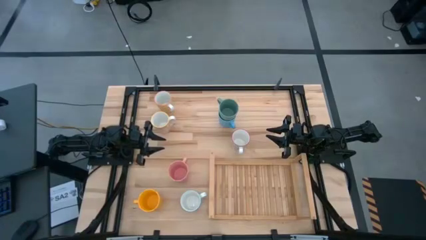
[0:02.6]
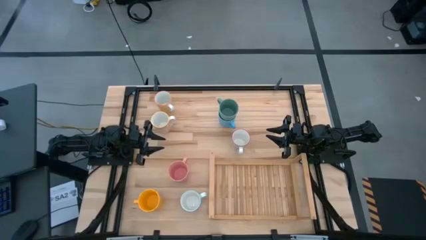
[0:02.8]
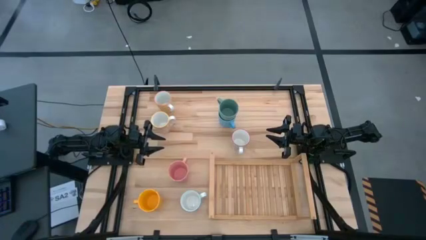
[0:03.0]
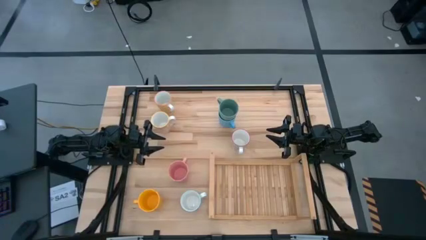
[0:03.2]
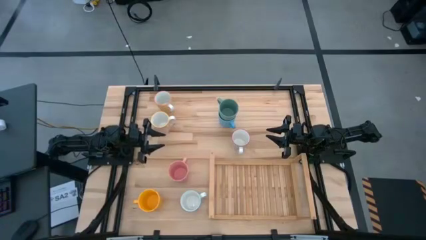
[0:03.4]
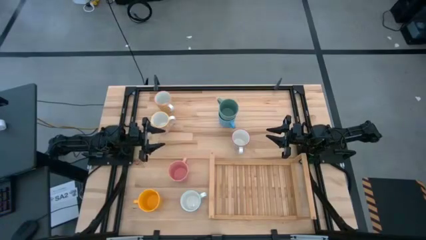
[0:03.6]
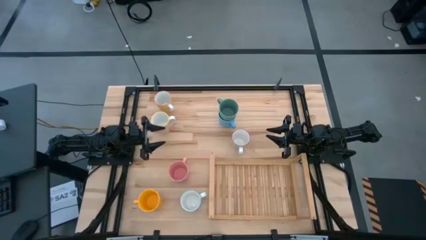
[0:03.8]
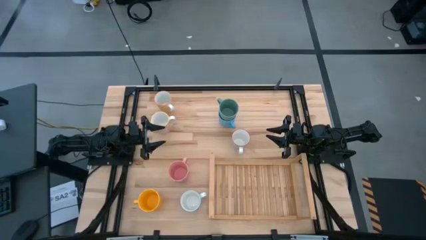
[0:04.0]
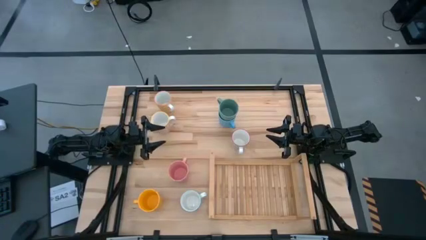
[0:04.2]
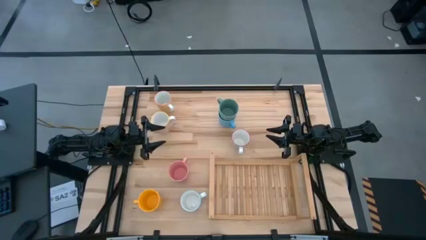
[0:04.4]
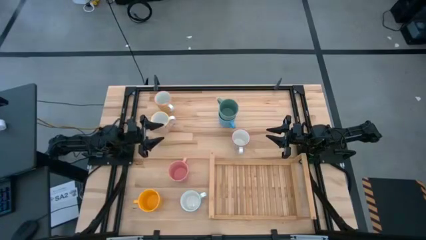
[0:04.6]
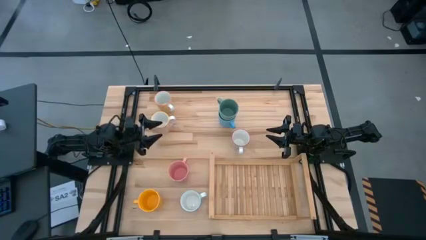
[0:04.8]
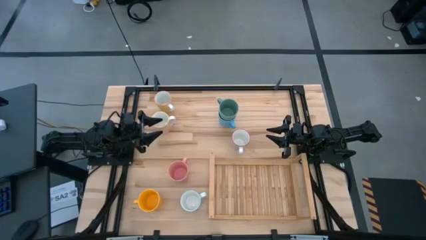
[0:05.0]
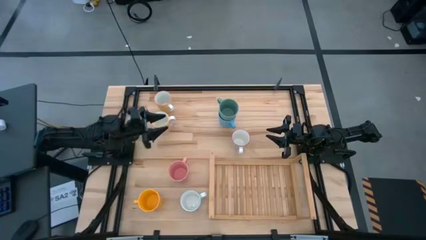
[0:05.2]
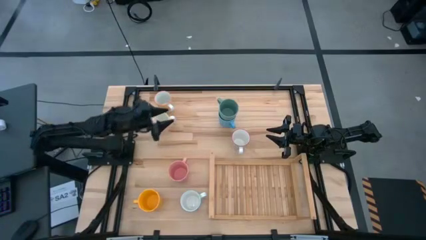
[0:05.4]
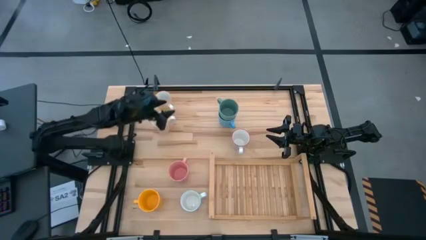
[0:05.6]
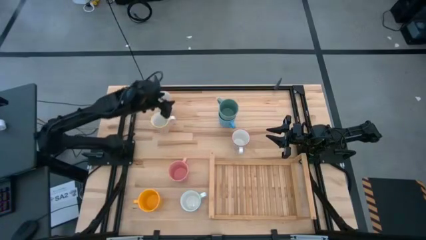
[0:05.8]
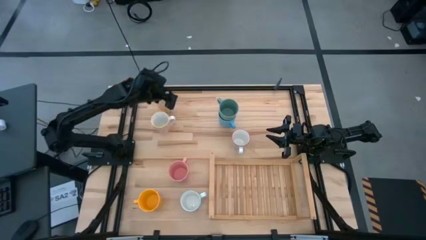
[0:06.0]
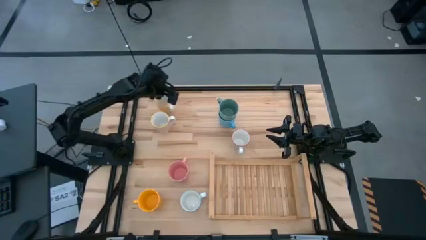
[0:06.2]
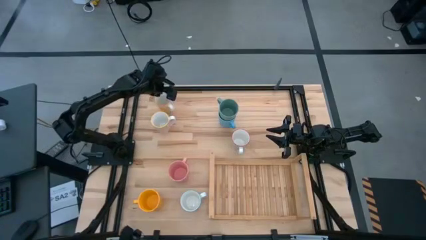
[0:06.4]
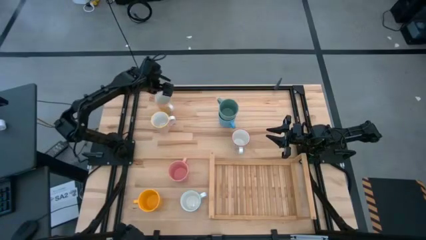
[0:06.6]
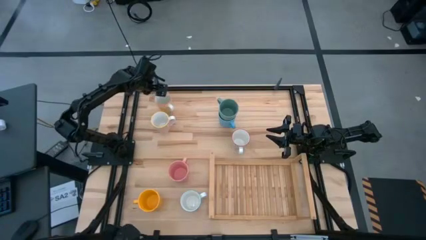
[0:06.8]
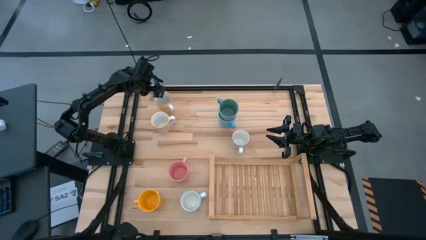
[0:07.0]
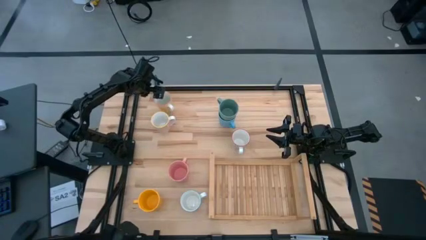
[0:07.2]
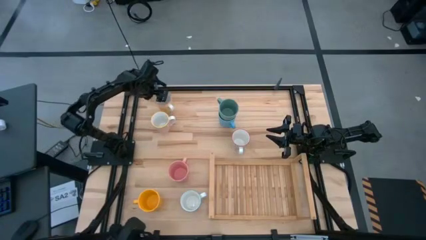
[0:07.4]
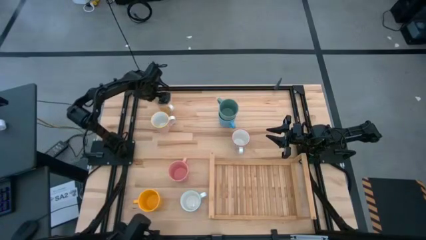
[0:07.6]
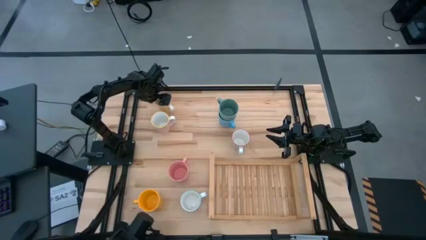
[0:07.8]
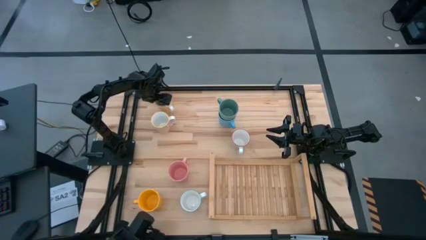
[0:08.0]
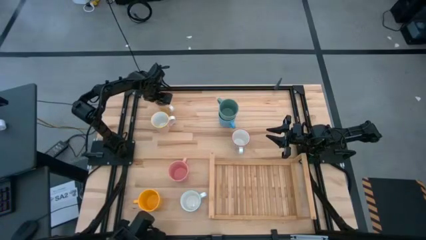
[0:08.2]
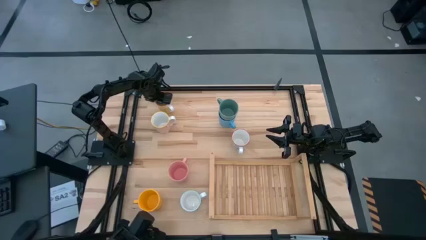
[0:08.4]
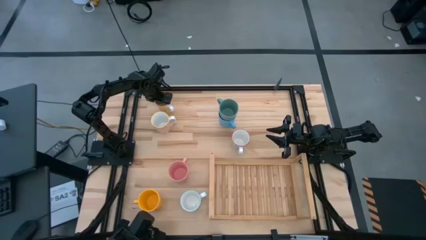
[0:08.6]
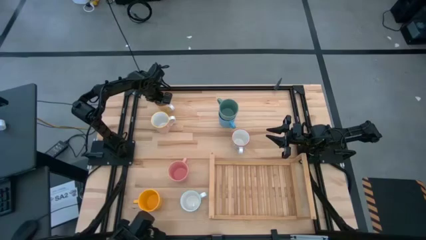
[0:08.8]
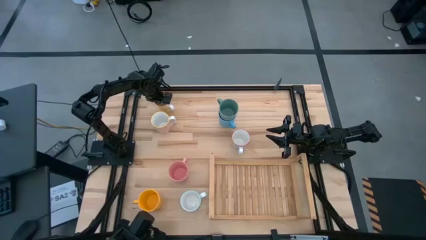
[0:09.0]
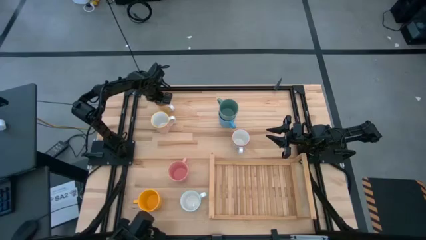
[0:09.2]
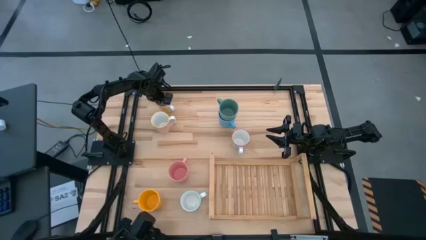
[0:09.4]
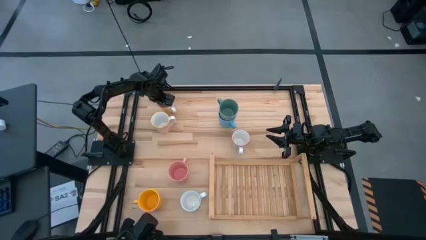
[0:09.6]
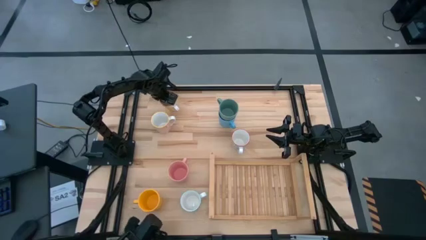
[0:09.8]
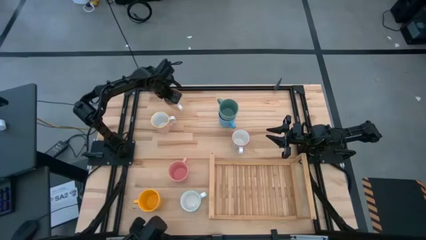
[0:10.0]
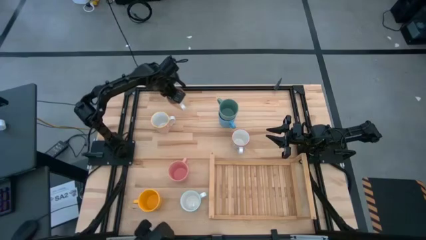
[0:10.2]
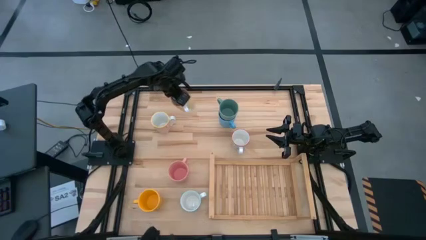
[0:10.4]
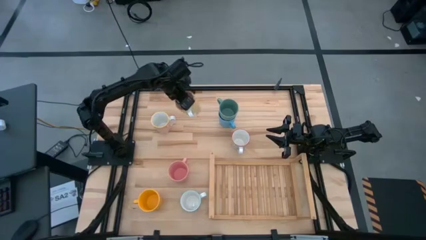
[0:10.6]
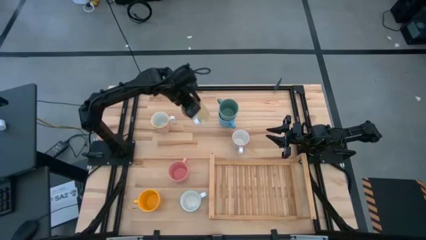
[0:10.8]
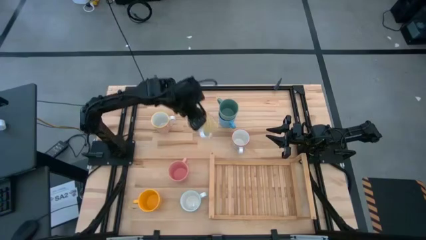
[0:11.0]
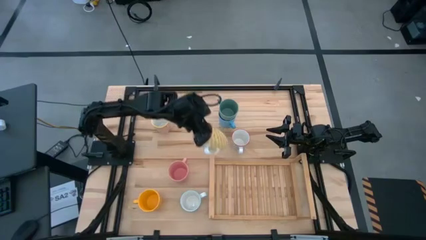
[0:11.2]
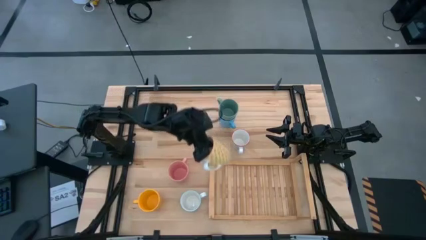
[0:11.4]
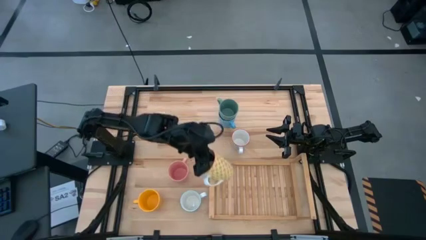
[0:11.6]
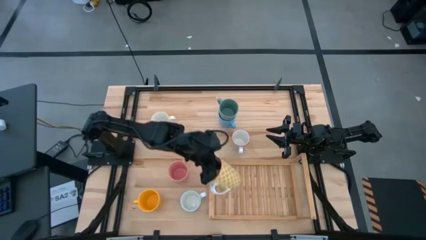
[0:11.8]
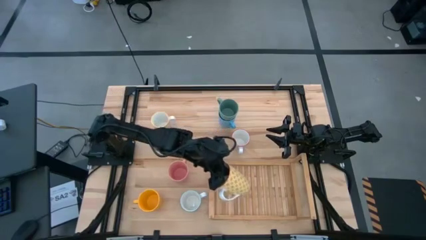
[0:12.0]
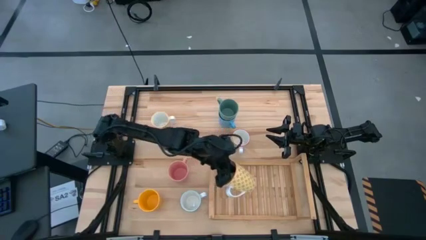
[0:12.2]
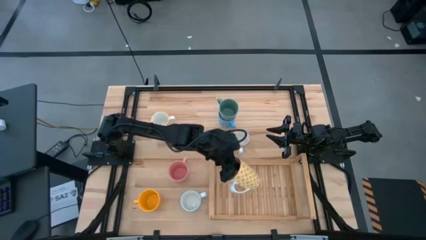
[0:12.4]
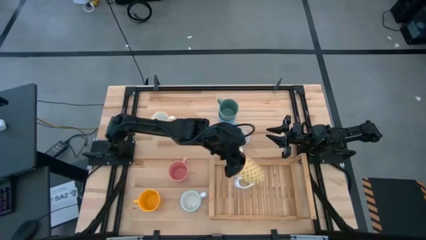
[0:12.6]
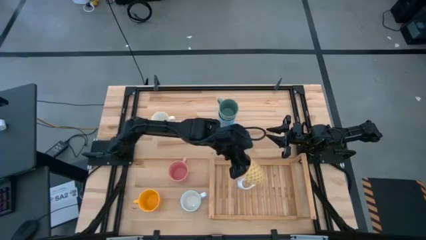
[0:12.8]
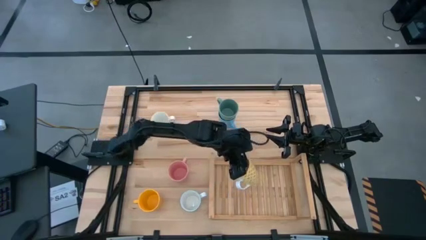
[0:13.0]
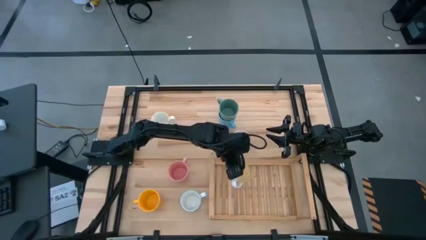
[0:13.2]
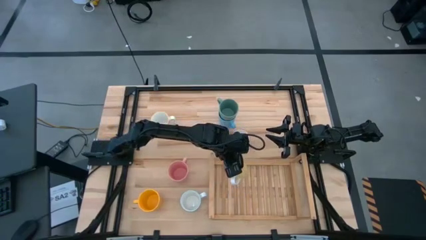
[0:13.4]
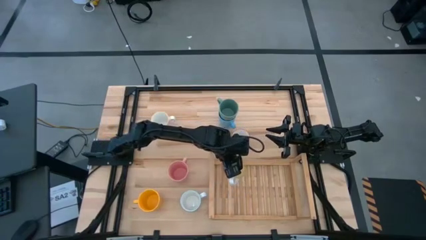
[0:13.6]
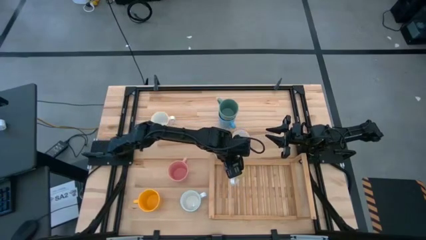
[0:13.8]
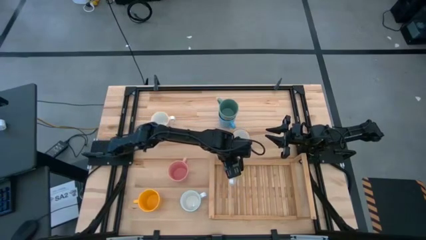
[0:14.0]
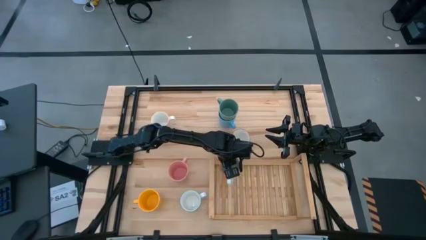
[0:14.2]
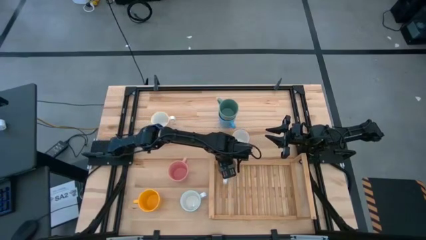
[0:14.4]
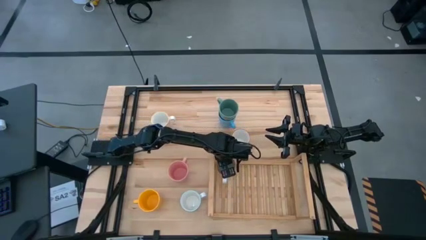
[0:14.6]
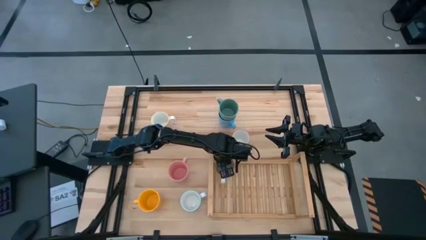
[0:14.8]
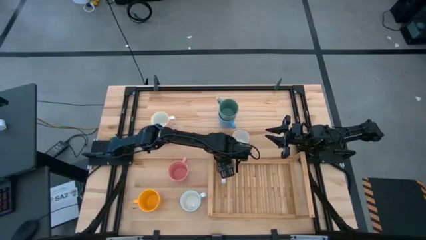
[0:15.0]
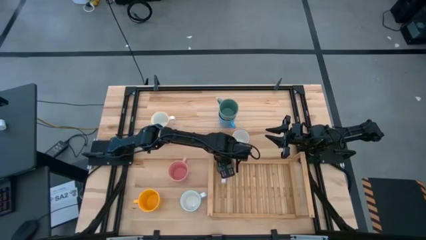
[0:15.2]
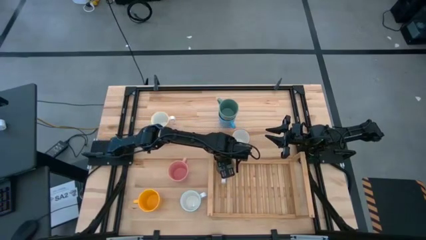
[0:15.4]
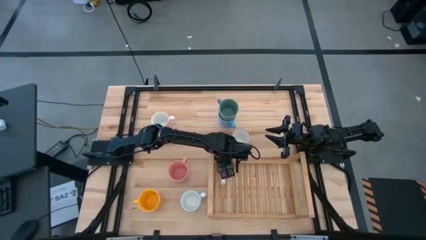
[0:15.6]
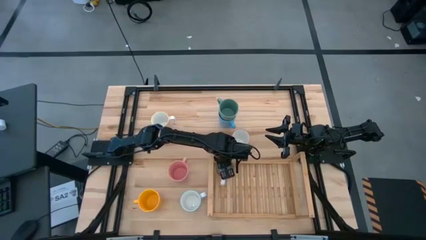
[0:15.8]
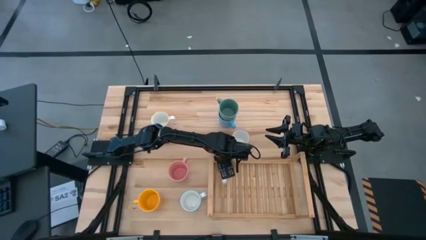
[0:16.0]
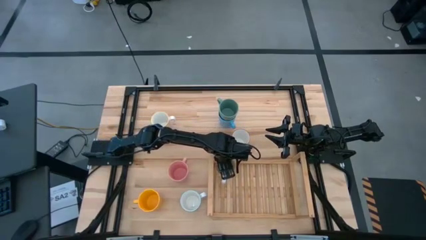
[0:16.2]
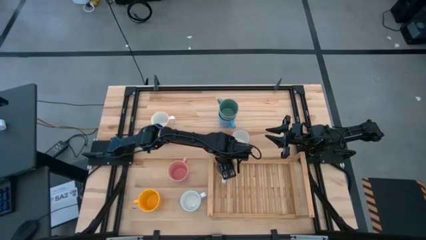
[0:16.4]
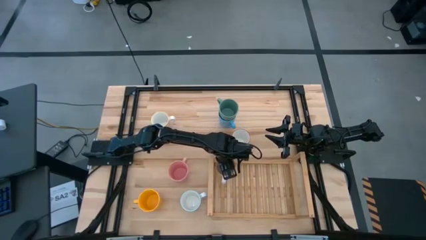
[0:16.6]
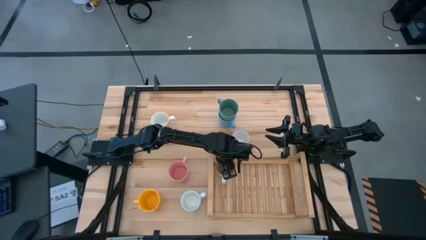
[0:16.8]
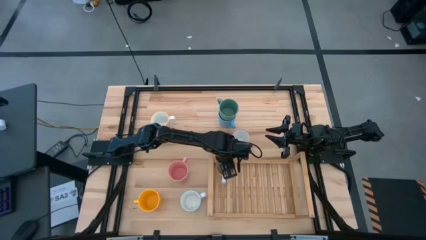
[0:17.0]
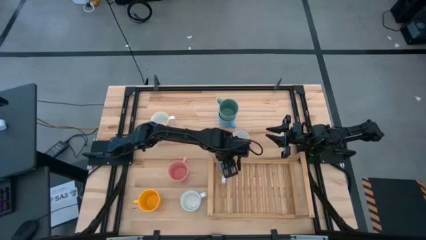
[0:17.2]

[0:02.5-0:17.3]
Task: Place coffee mugs
Put the orange patterned mug on the shelf
